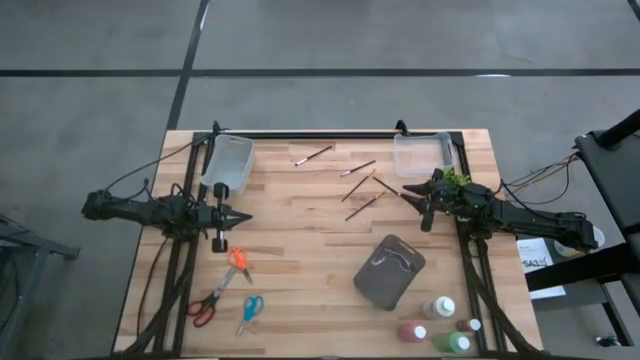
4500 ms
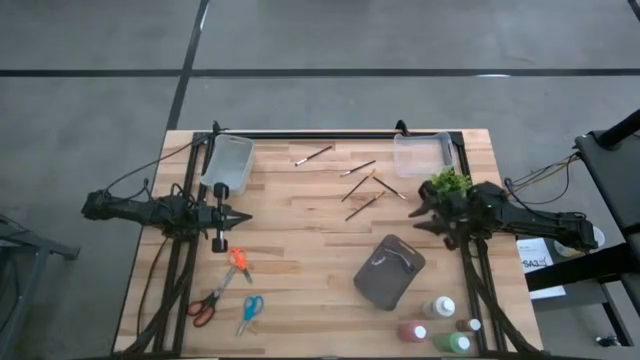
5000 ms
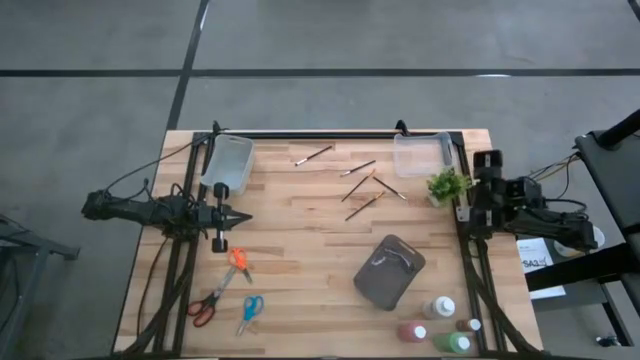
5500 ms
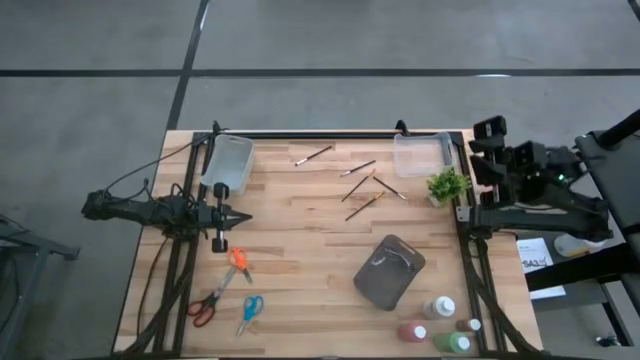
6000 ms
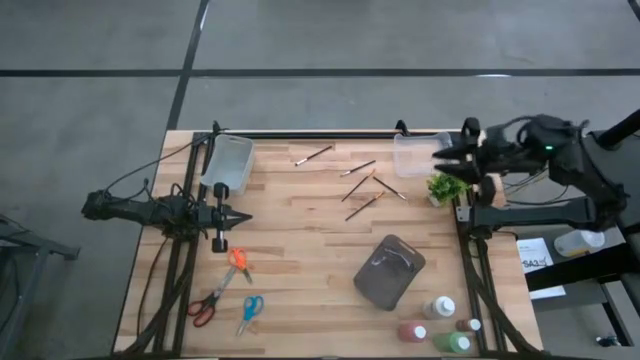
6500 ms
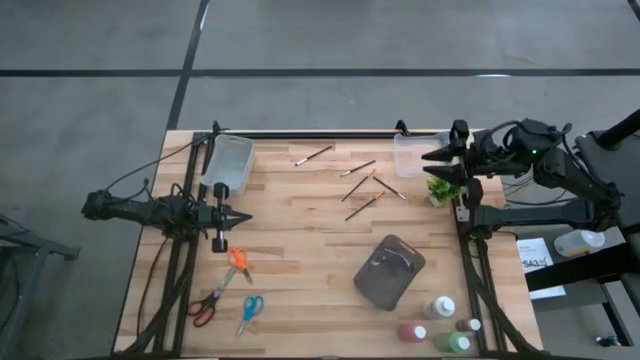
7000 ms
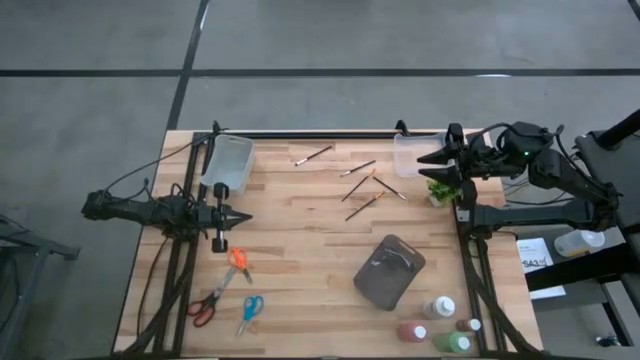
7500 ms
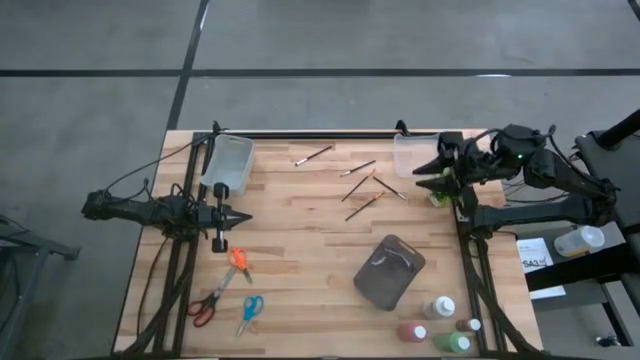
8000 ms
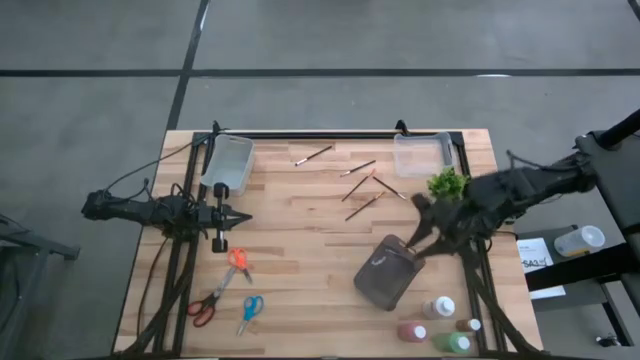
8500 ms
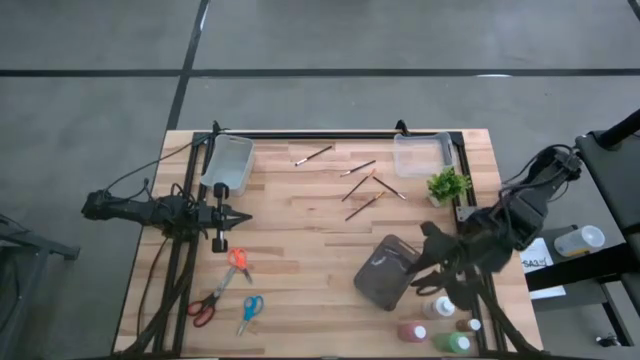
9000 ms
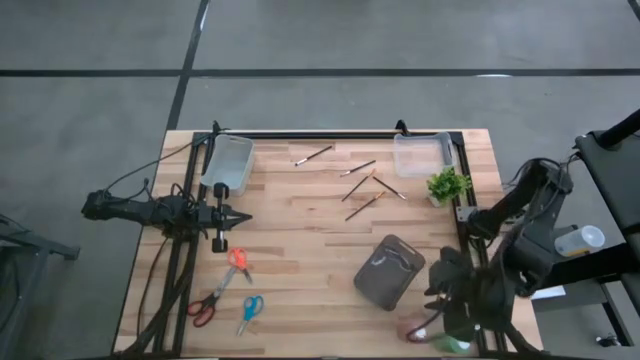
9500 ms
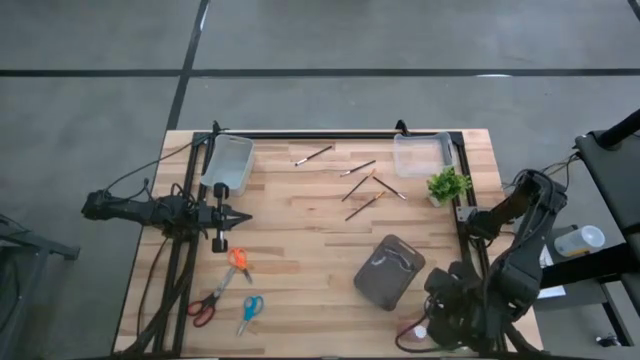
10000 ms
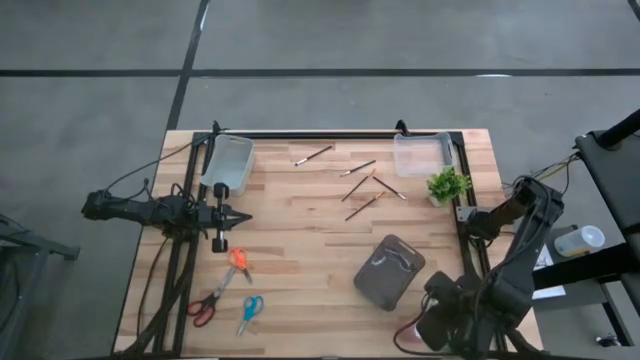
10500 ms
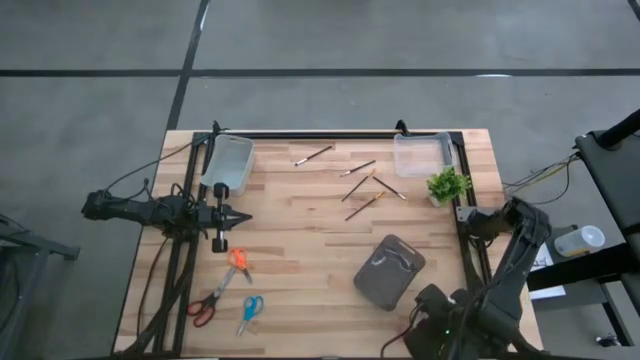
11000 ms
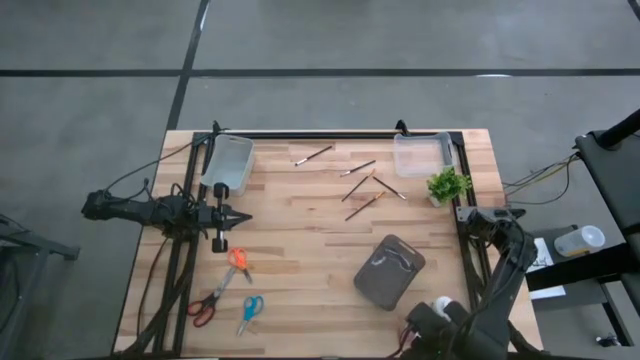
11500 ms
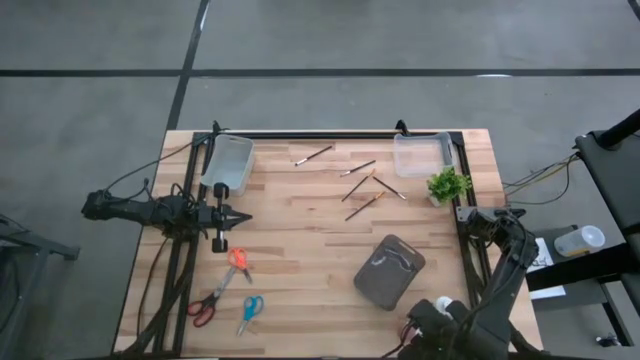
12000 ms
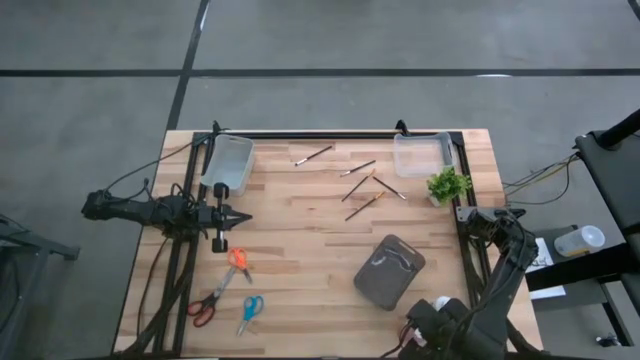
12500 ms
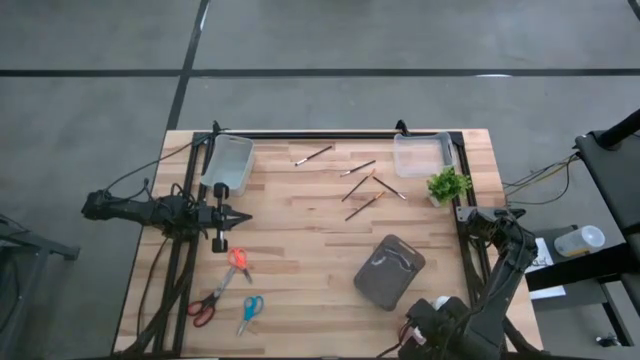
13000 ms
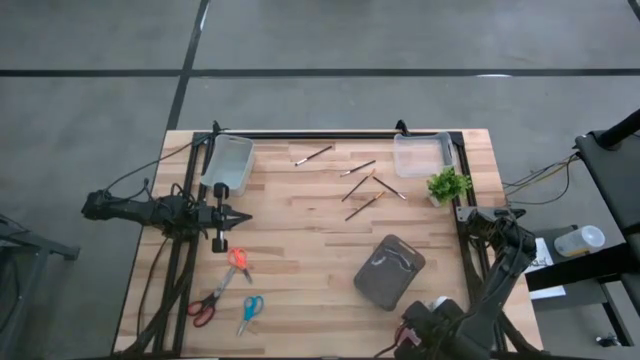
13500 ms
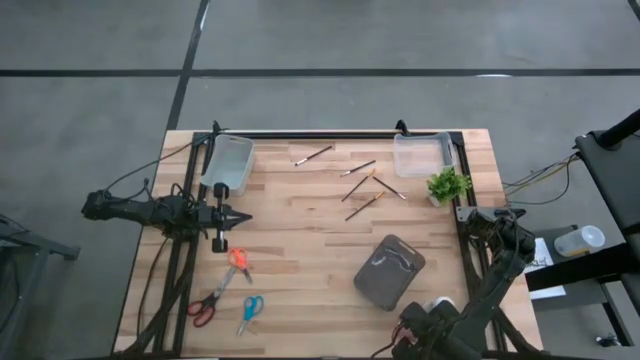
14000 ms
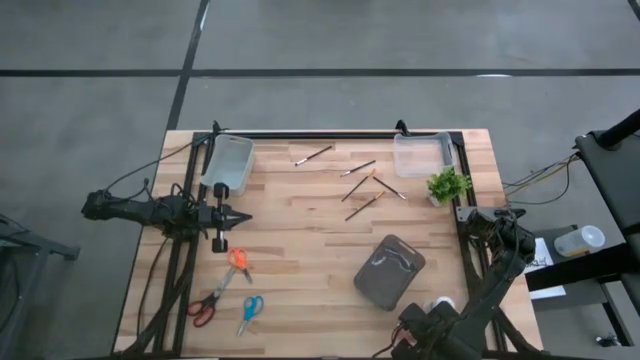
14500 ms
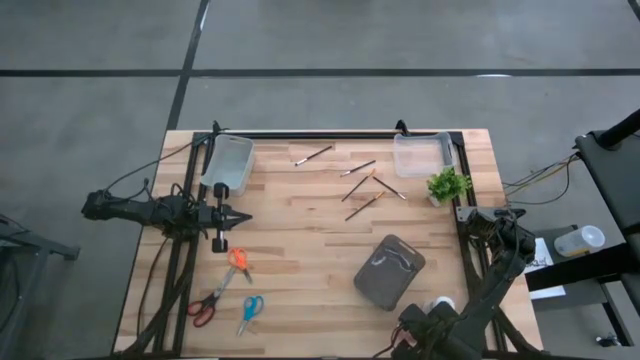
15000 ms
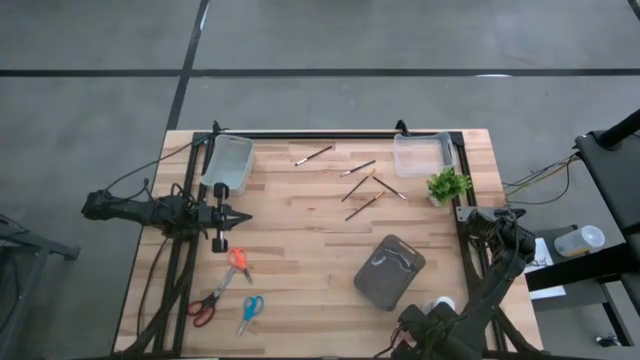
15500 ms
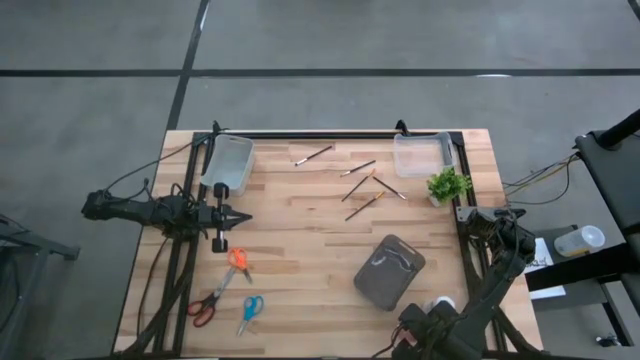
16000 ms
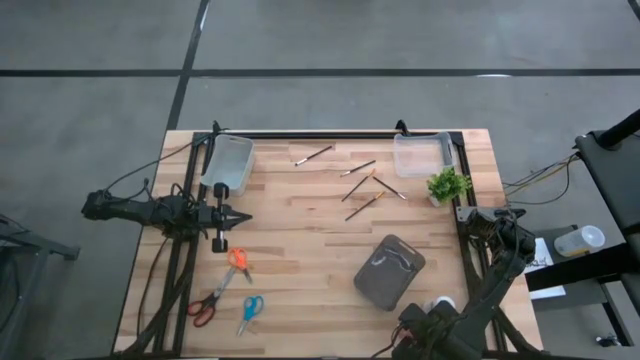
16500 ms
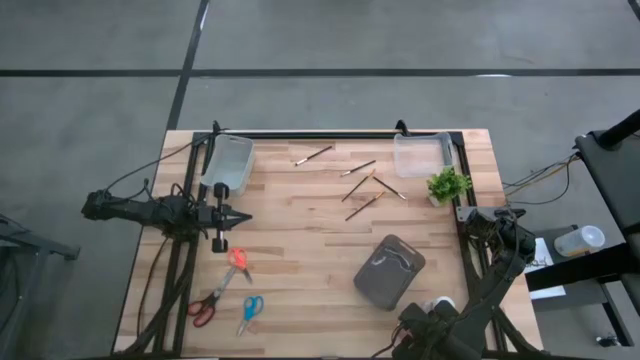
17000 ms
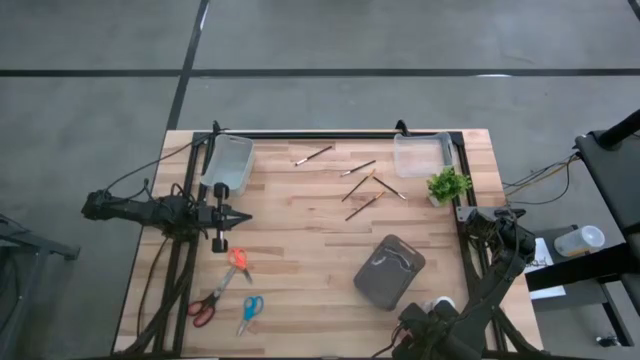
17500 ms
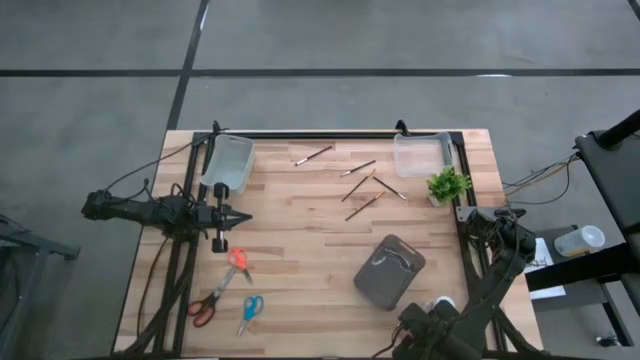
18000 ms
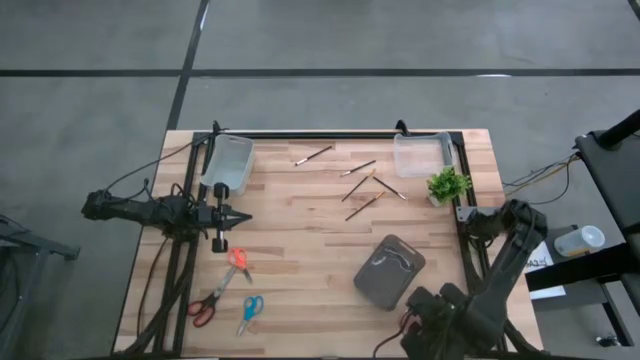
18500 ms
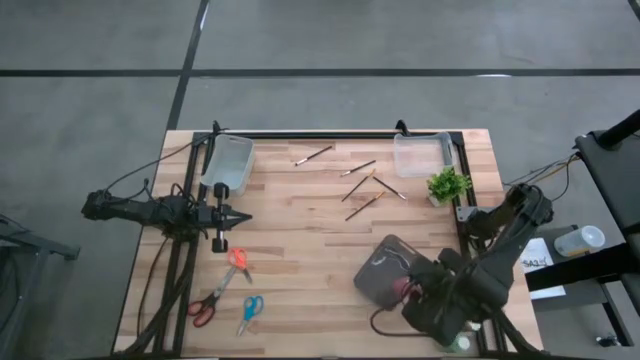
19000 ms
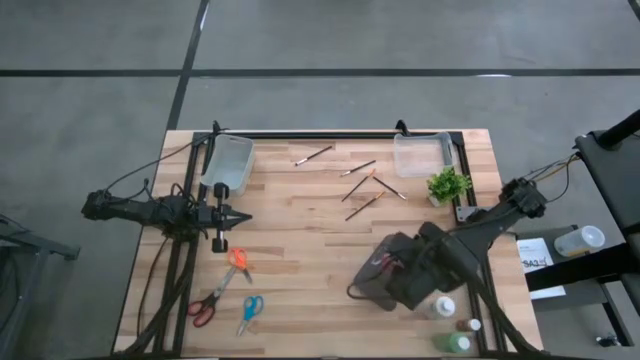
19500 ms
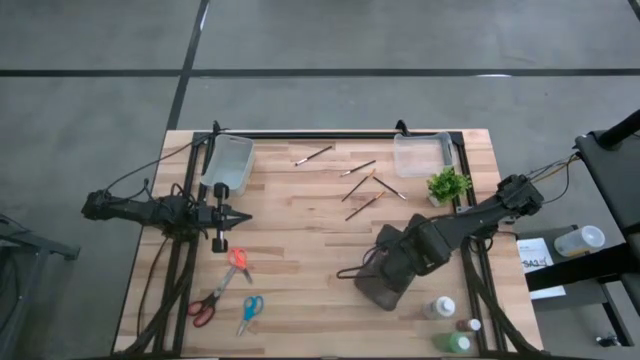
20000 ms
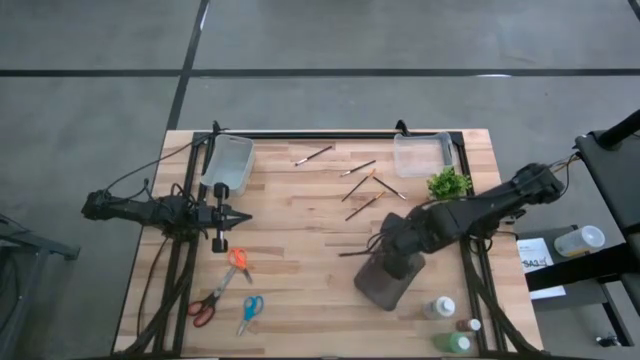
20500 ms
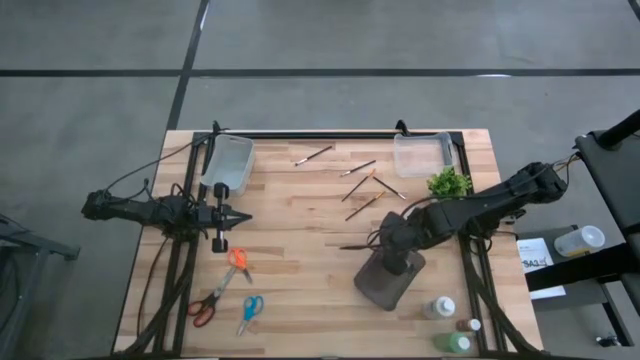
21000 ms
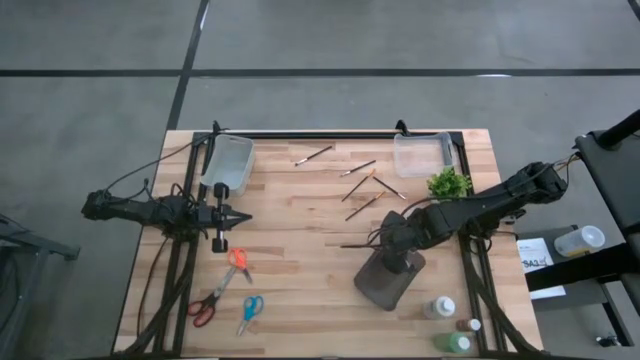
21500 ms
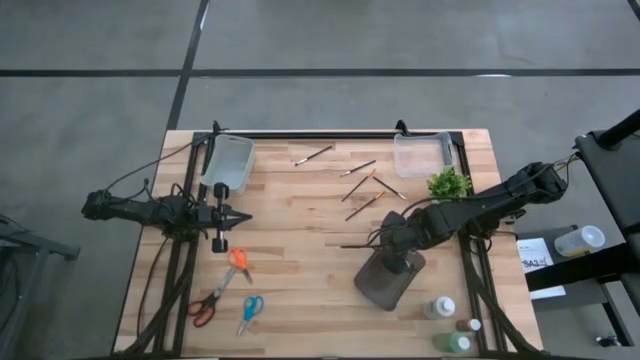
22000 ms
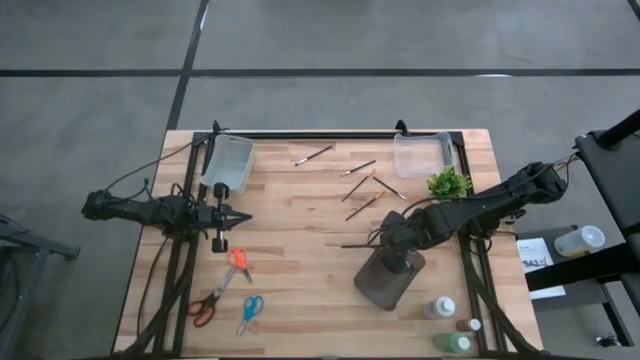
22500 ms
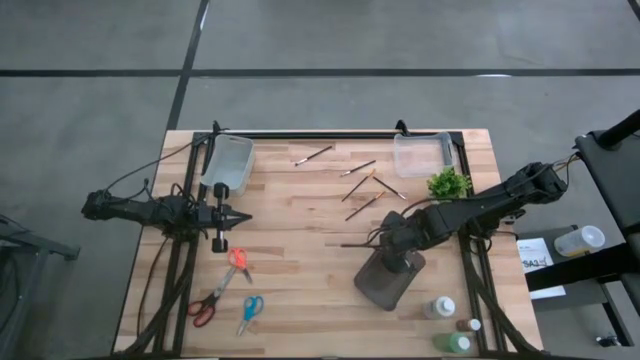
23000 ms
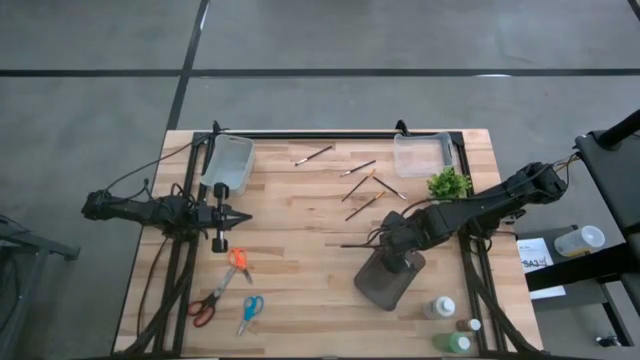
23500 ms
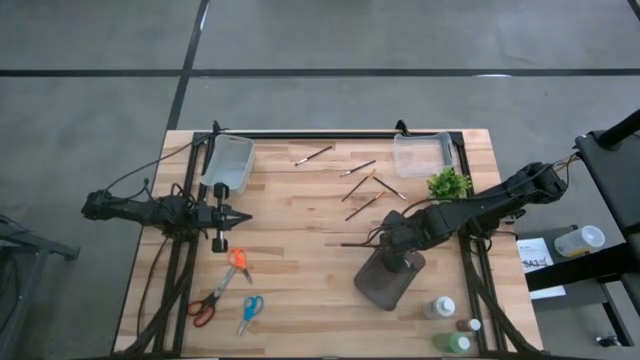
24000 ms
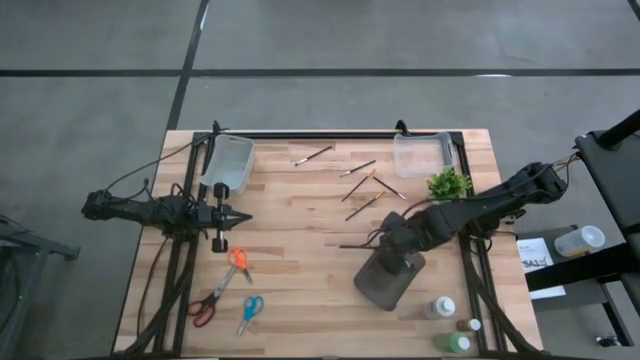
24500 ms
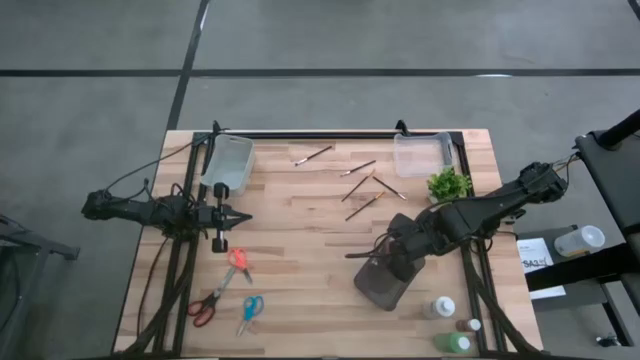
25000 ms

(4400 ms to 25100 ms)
Task: Pick & Place Paint Supplies
Put the red paint bottle into the black bin
